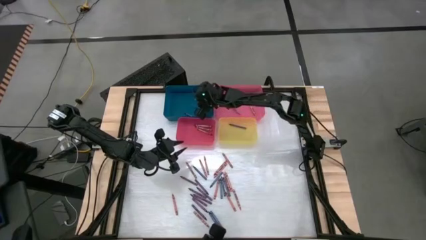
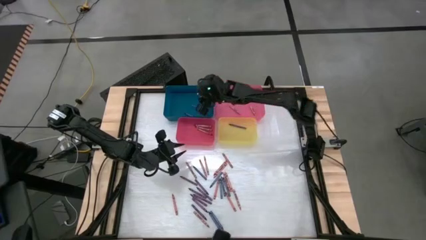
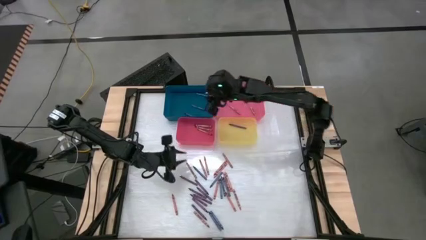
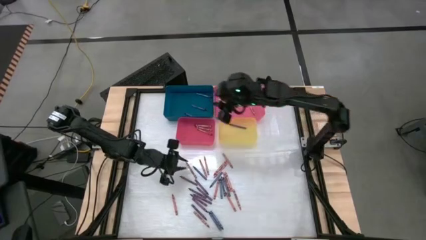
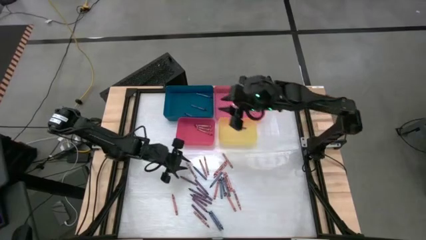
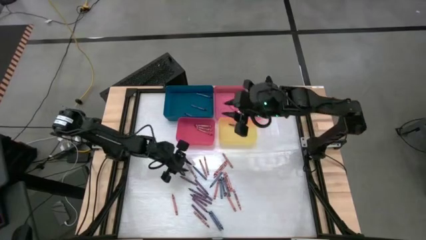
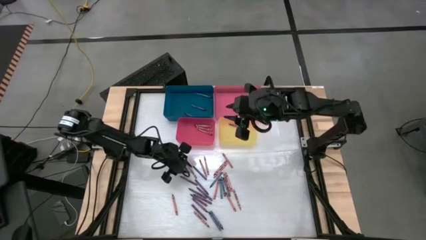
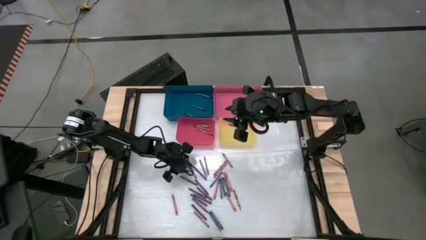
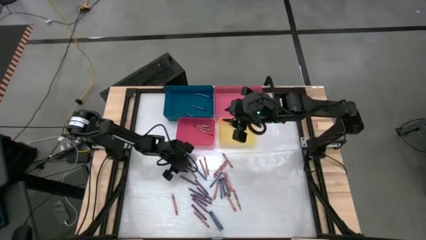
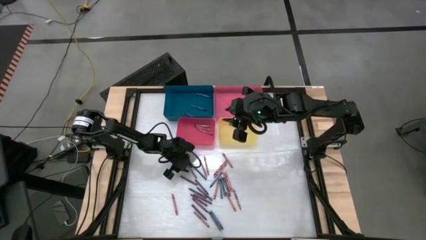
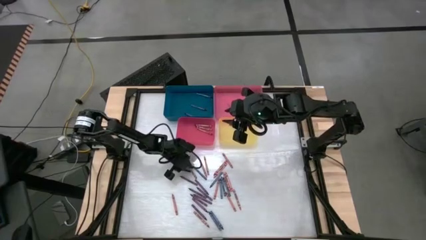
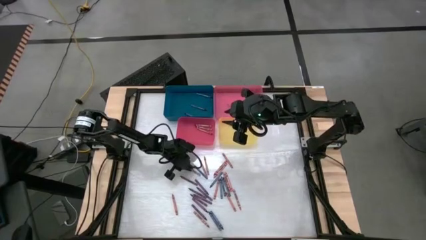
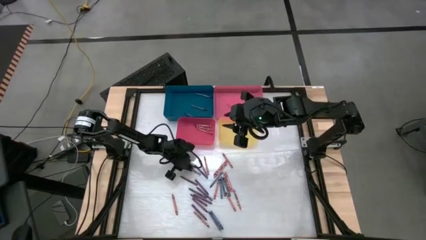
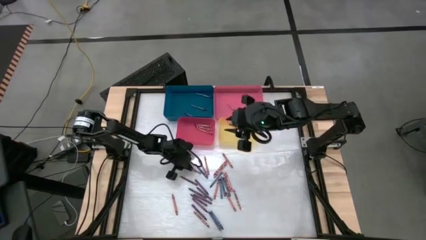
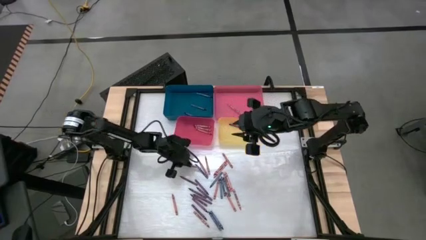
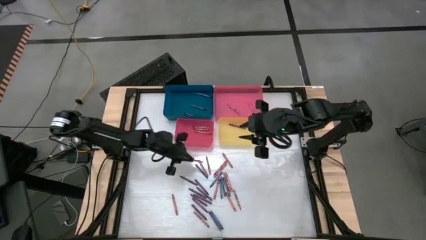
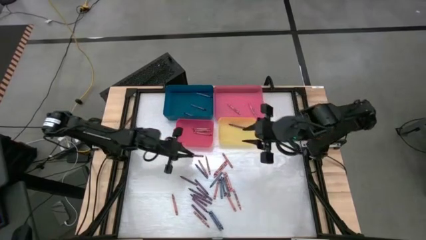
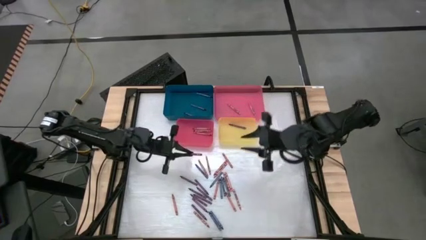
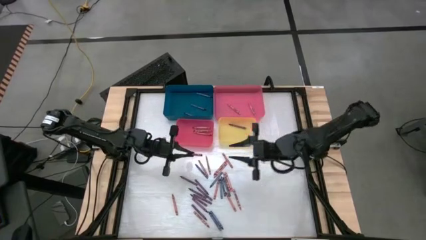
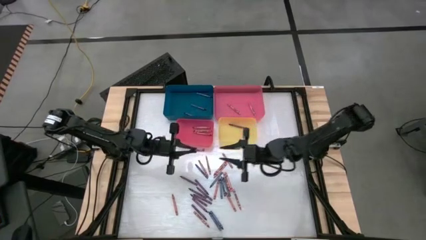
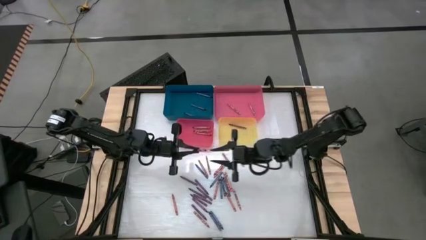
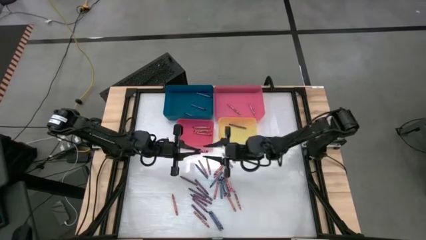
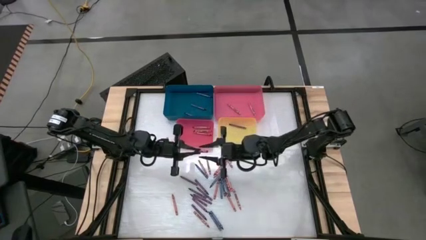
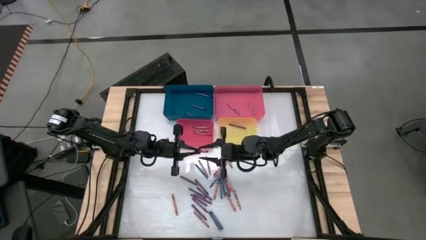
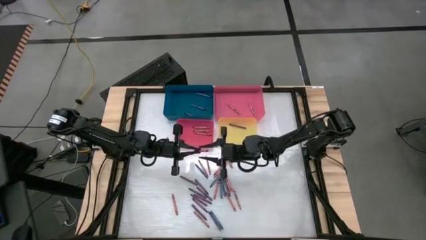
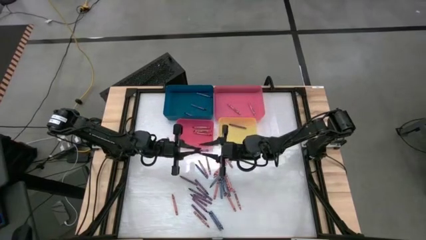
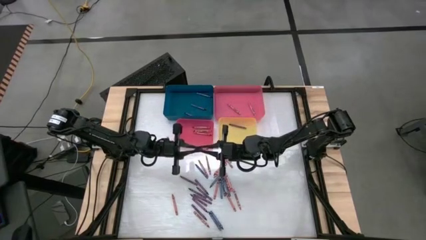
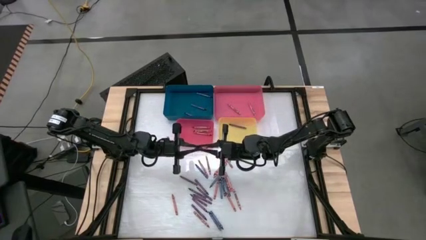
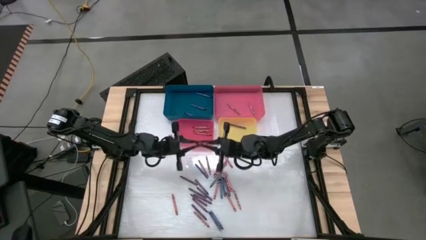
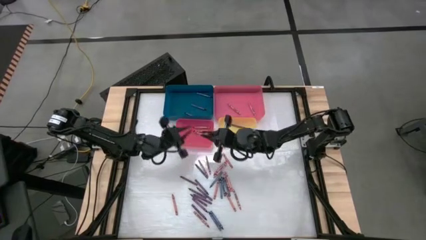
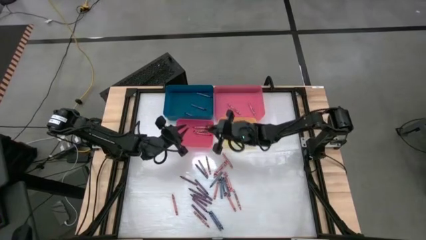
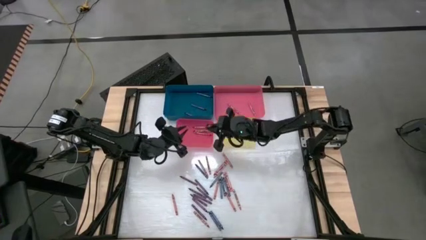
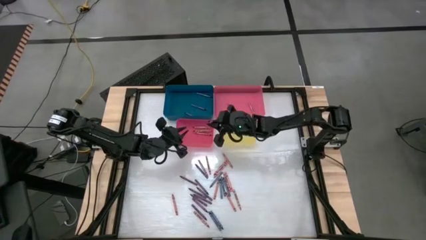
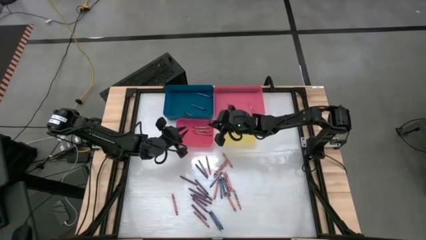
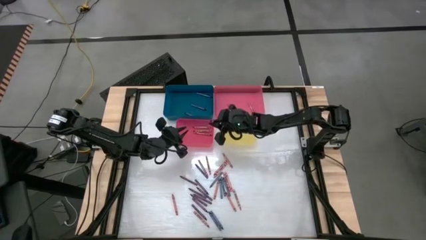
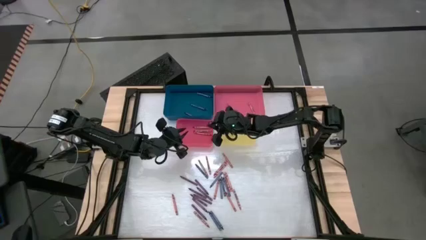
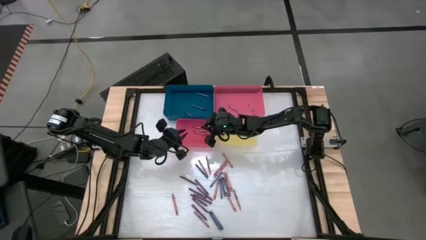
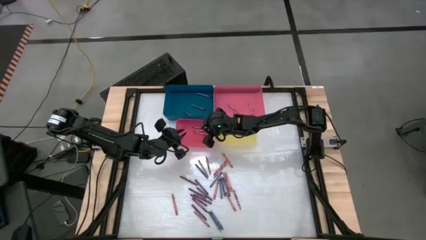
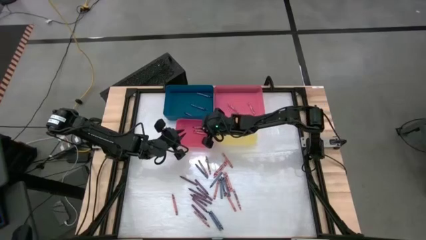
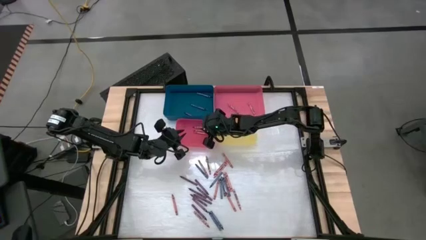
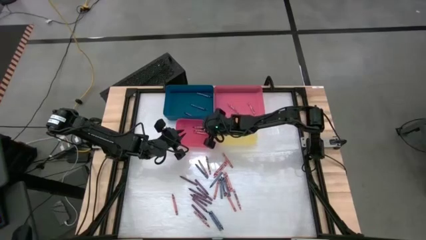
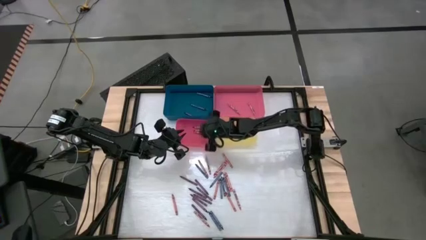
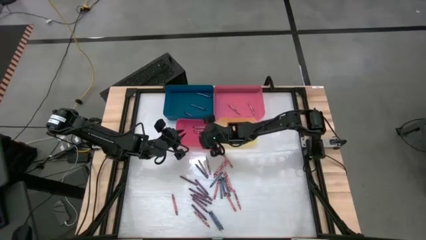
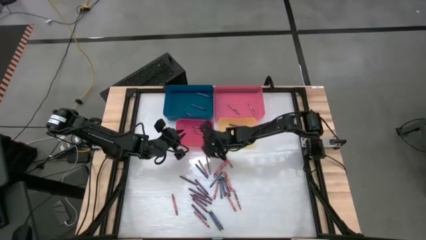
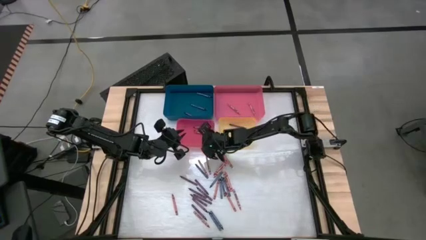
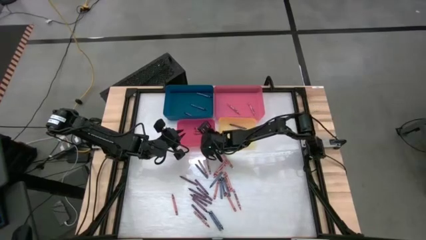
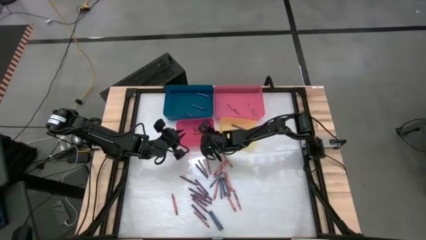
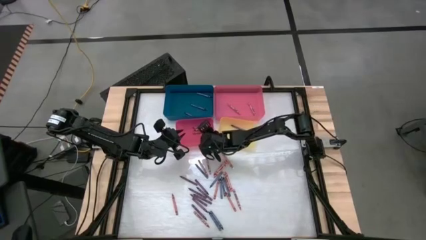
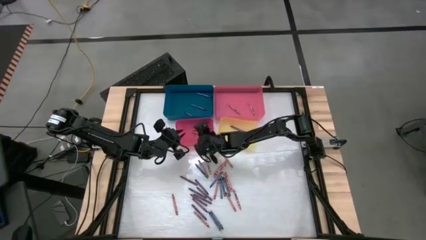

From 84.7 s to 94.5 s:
Task: Sort crayons
Put the red crayon into the red bin

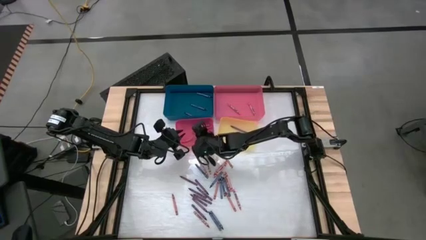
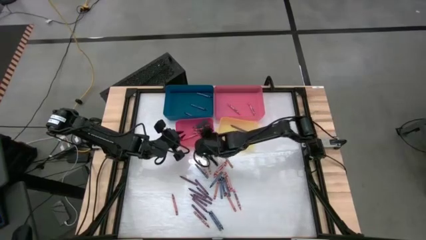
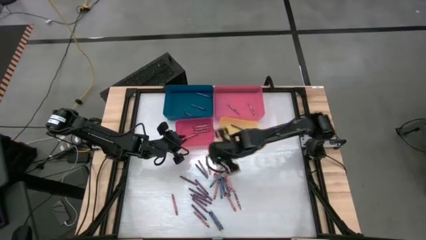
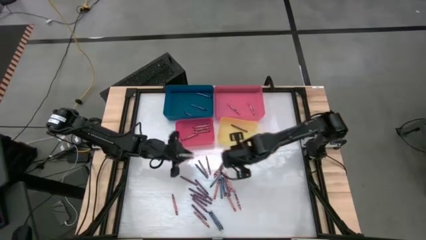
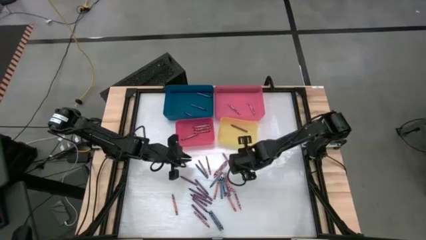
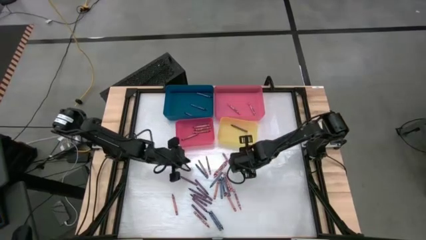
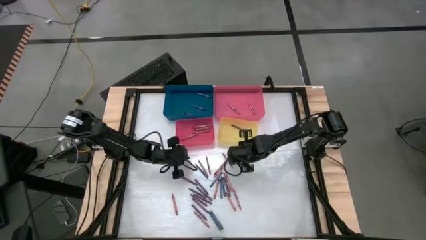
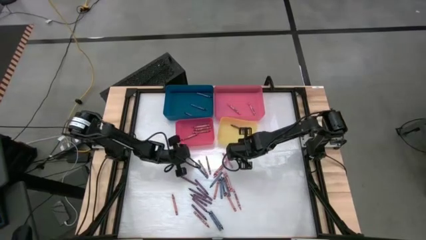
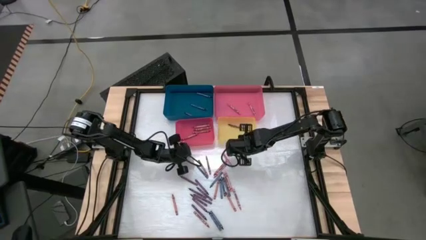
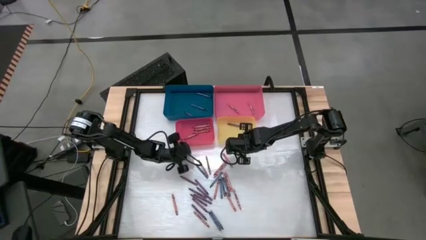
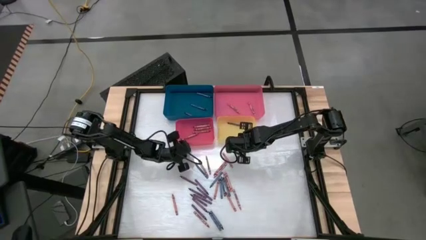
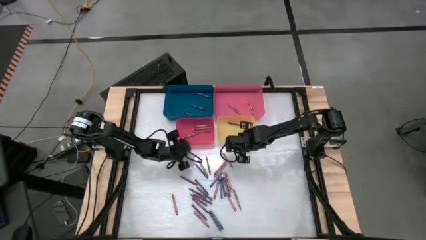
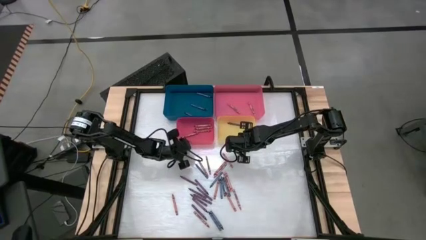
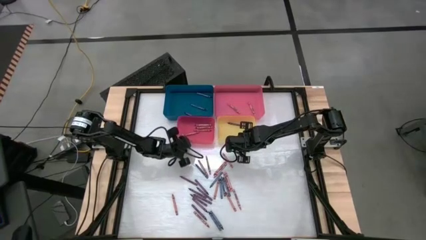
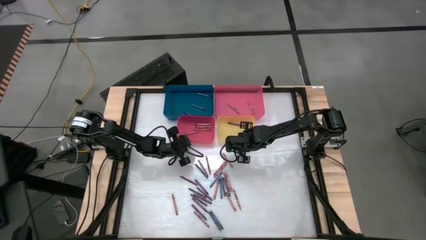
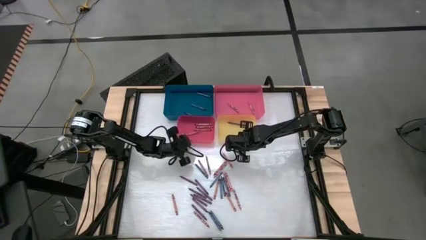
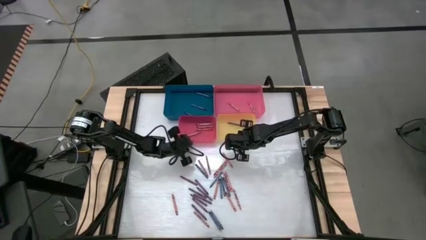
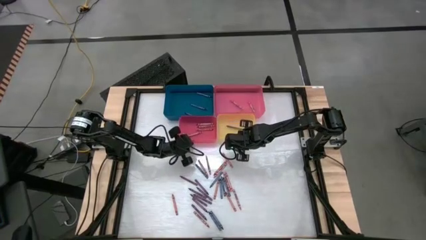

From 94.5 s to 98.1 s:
Adjust the bins on the table
